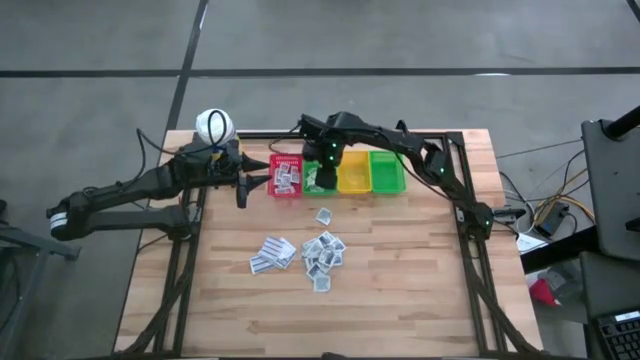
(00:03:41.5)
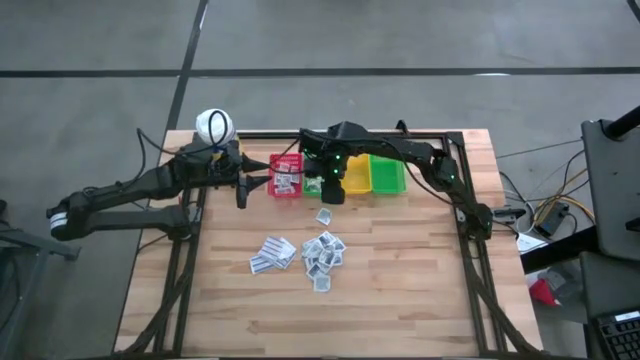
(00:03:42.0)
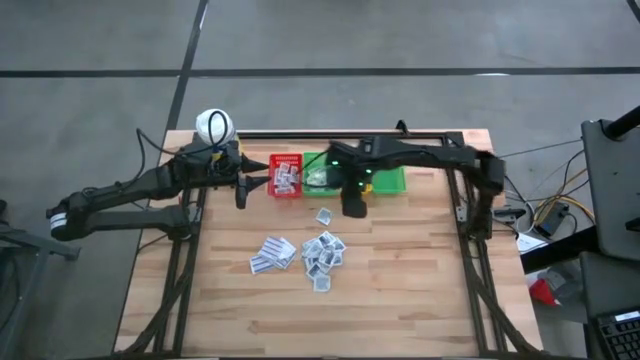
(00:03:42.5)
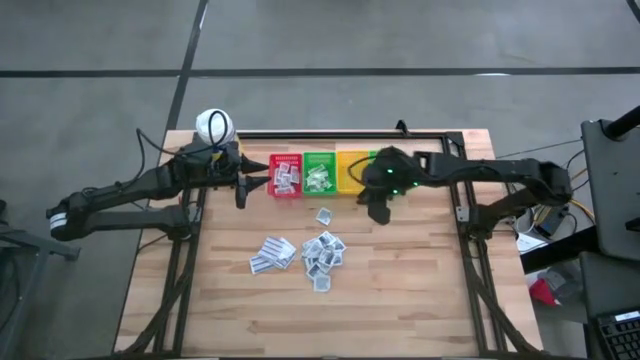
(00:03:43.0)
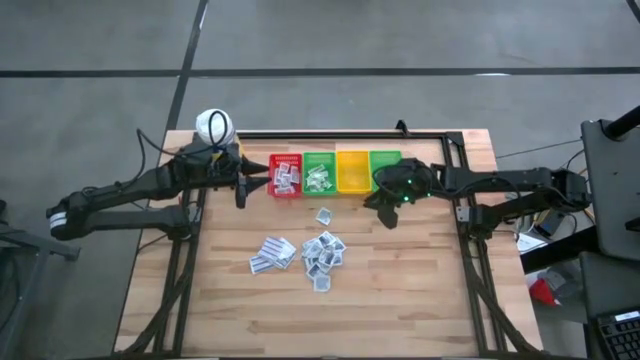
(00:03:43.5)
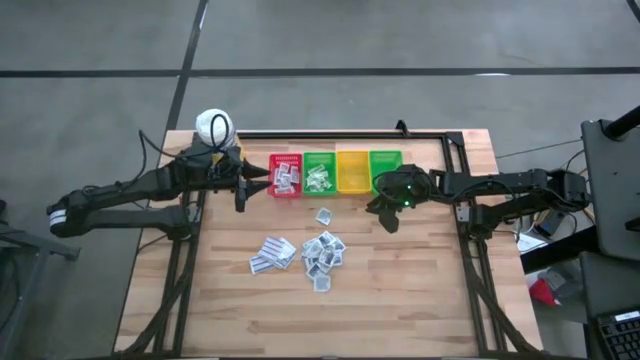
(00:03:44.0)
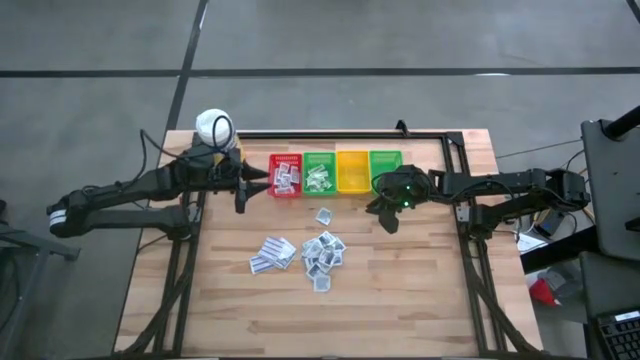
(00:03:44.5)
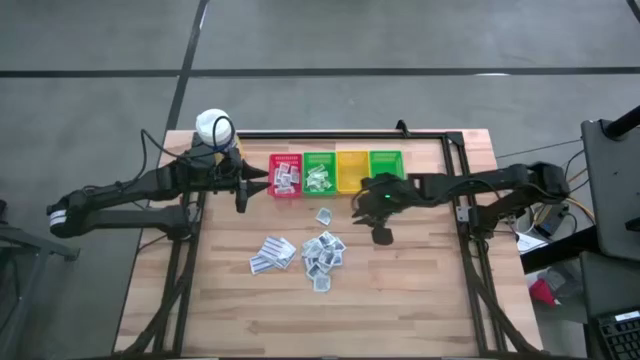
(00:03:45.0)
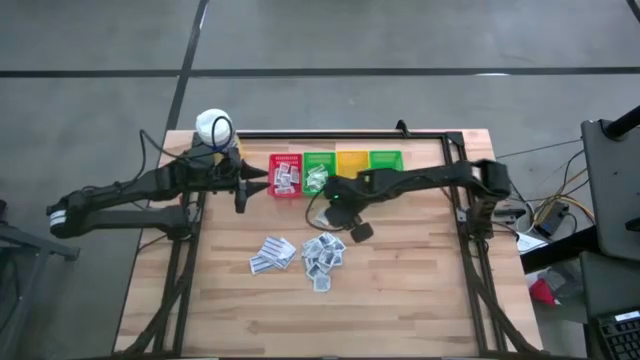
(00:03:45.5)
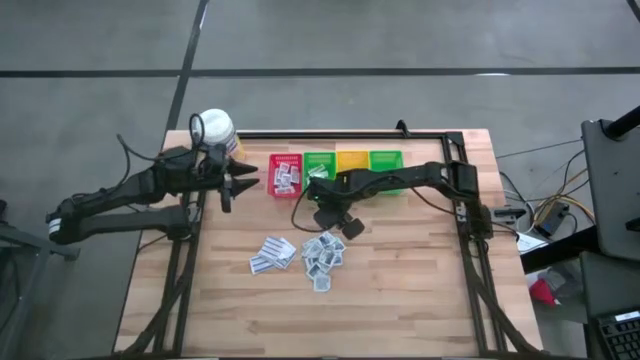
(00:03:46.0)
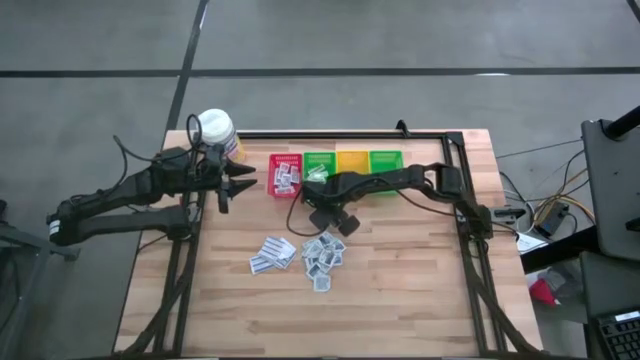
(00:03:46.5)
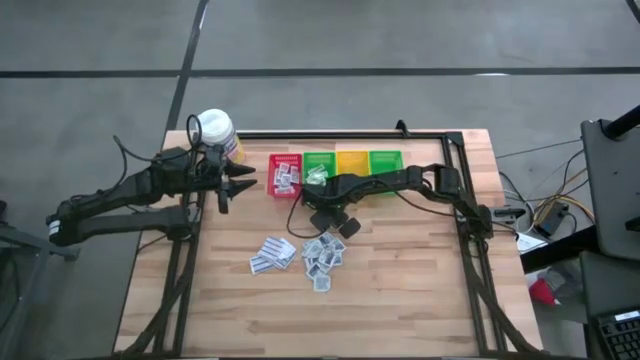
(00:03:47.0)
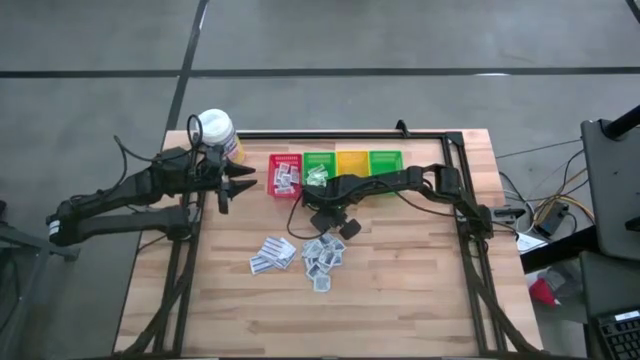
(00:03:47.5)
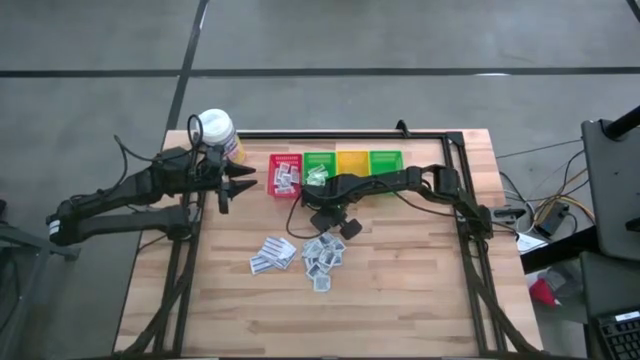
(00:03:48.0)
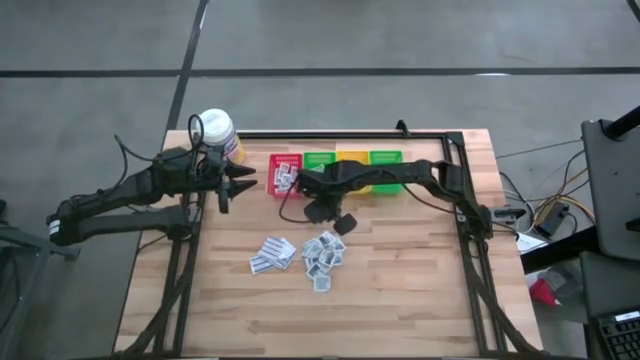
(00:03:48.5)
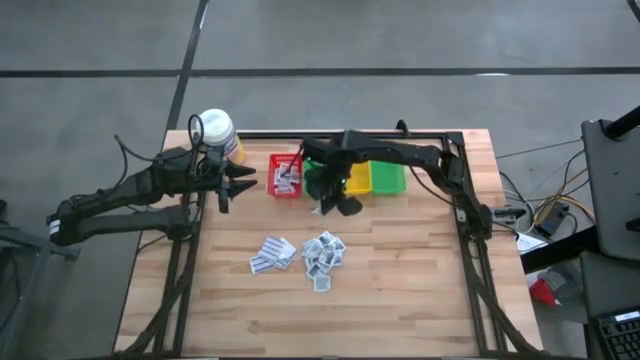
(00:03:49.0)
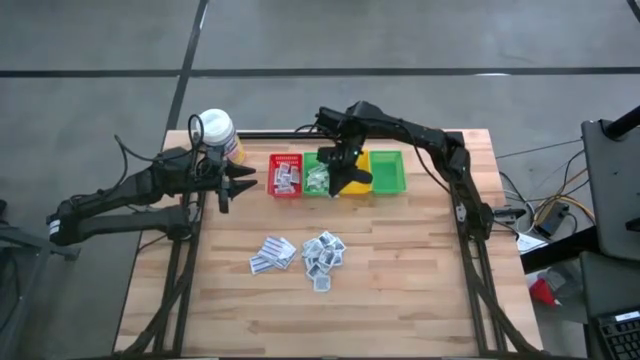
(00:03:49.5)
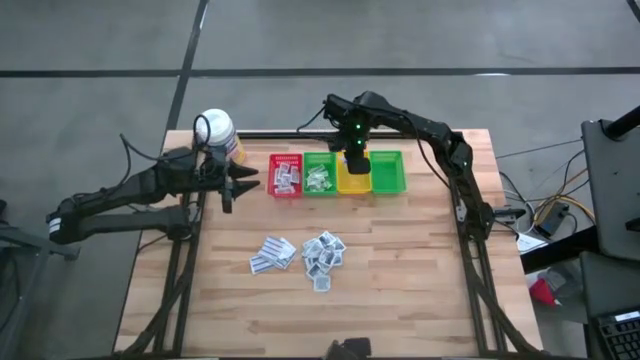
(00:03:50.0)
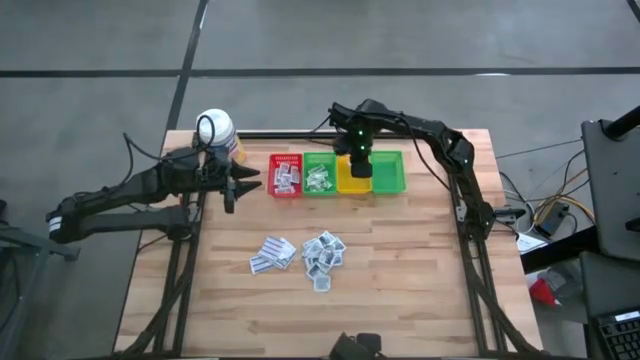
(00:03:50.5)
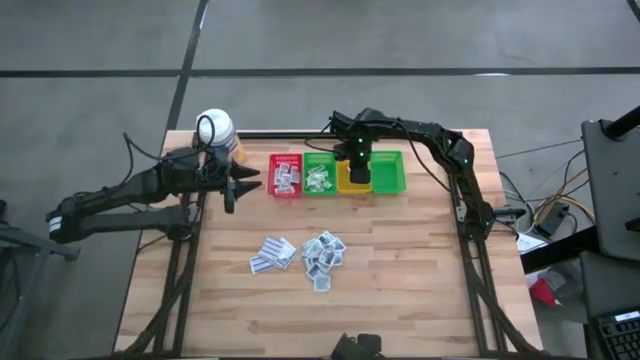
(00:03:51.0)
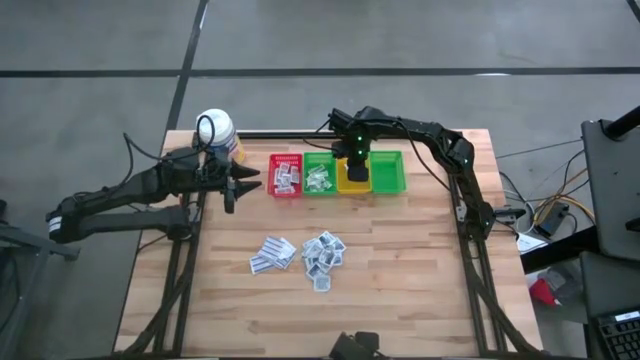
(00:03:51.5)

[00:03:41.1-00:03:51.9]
Task: Pick & Place First Aid Supplies
Put the alcohol pad into the yellow bin

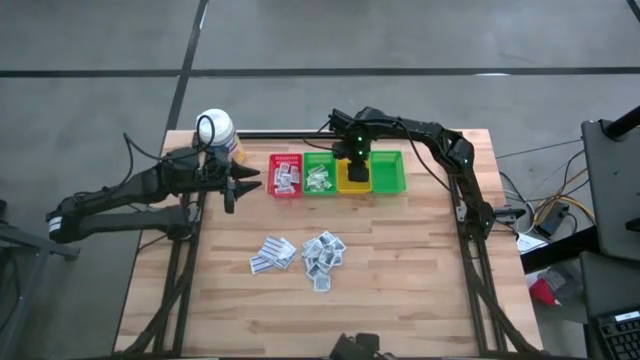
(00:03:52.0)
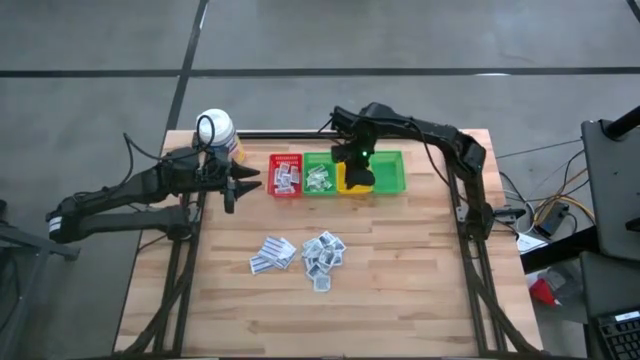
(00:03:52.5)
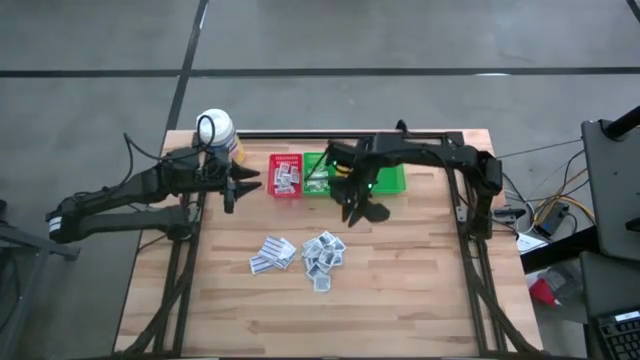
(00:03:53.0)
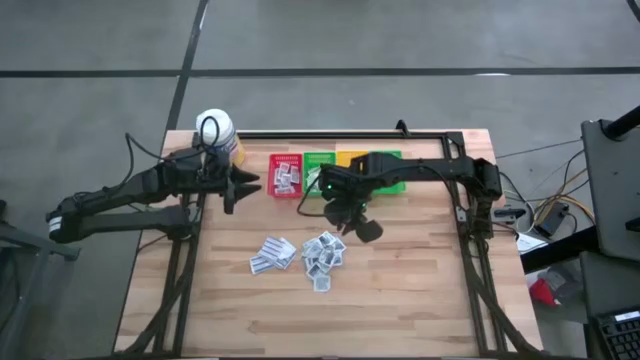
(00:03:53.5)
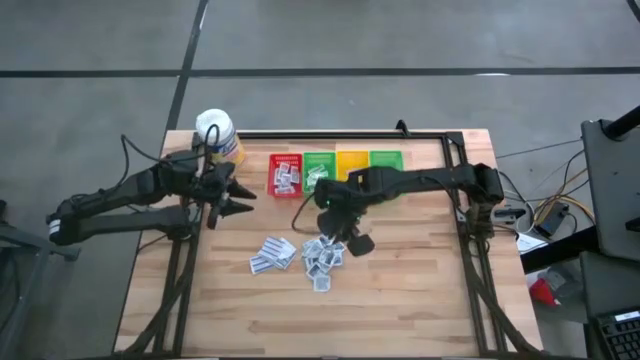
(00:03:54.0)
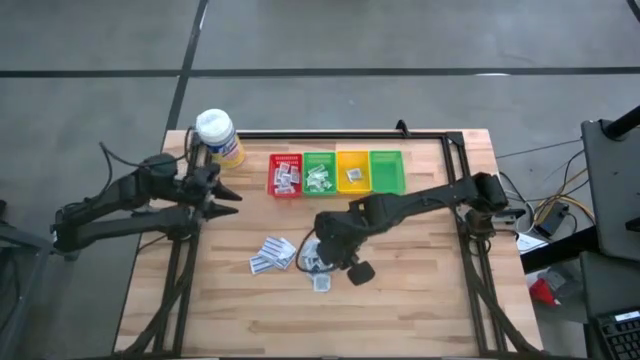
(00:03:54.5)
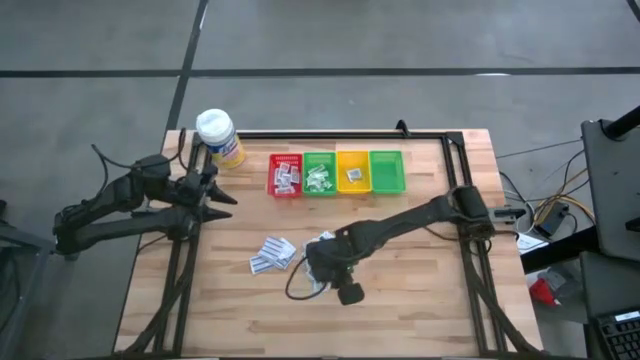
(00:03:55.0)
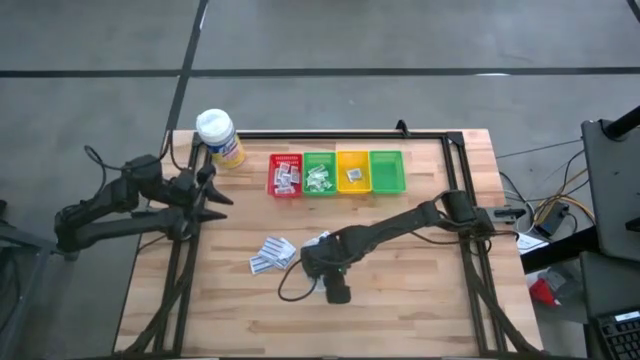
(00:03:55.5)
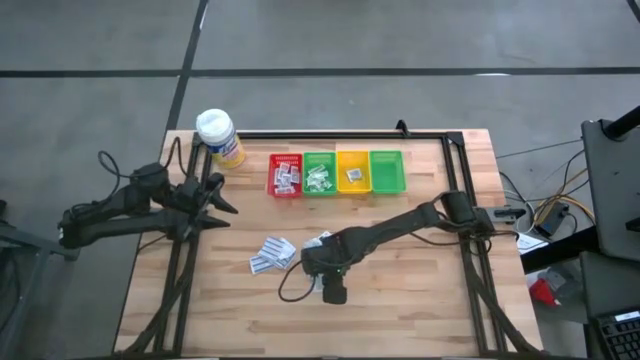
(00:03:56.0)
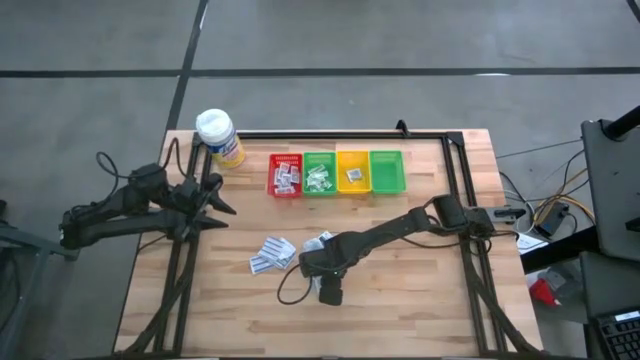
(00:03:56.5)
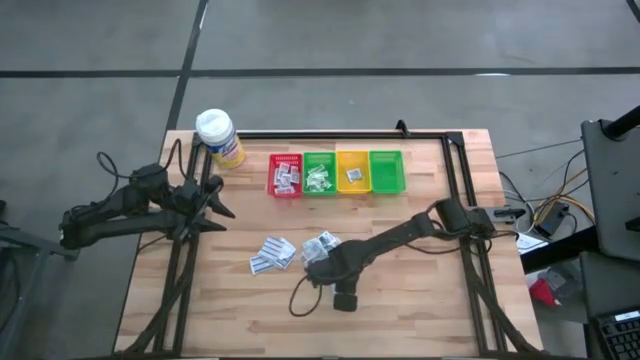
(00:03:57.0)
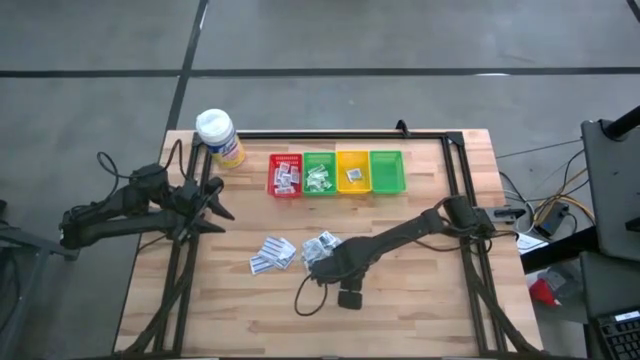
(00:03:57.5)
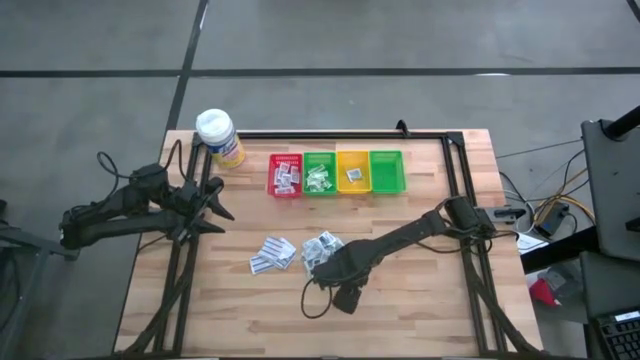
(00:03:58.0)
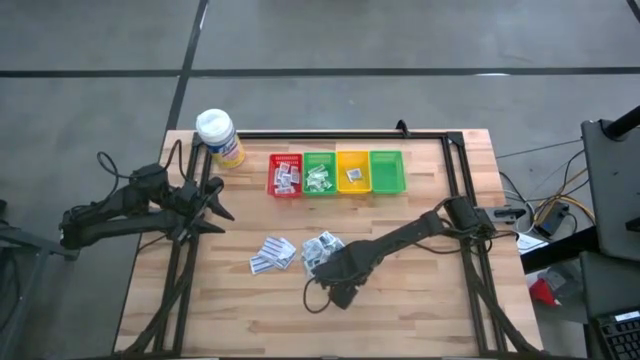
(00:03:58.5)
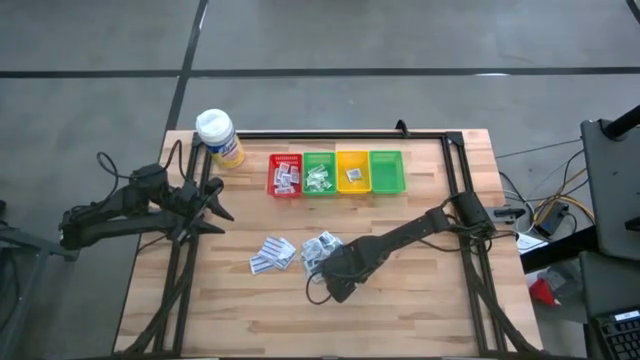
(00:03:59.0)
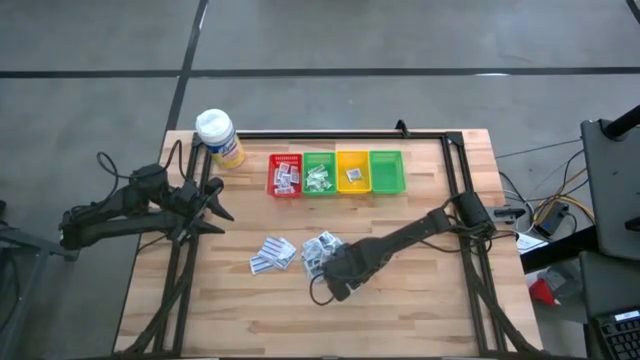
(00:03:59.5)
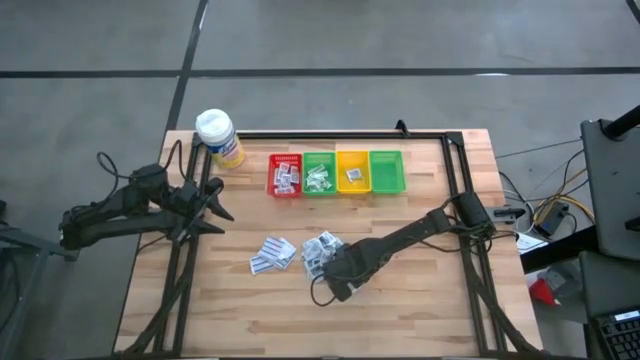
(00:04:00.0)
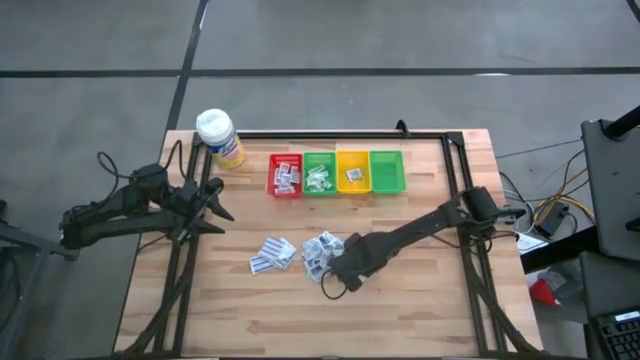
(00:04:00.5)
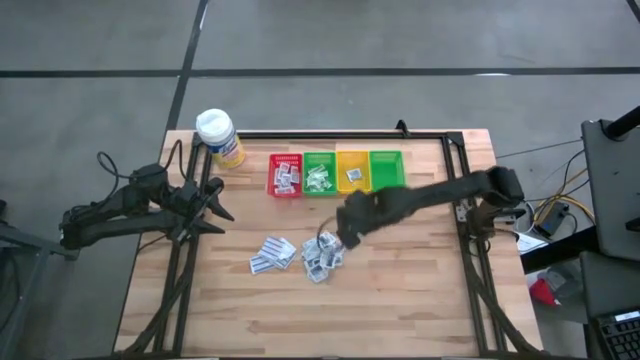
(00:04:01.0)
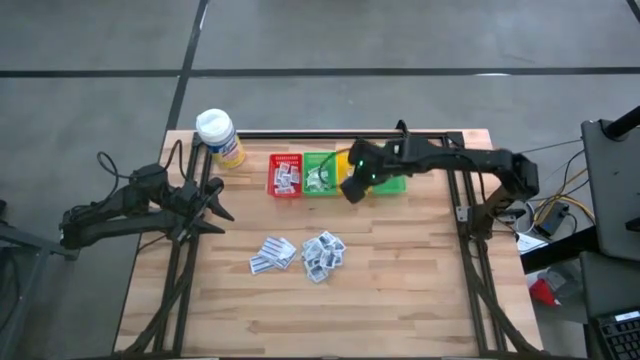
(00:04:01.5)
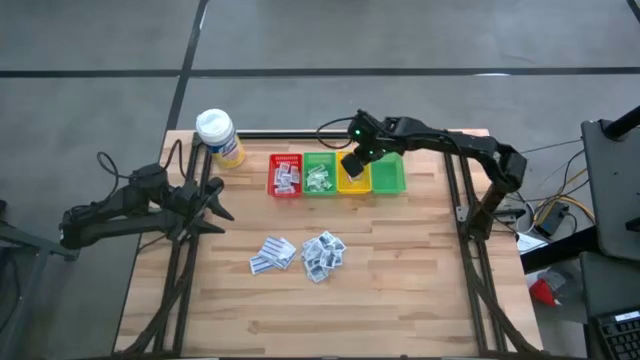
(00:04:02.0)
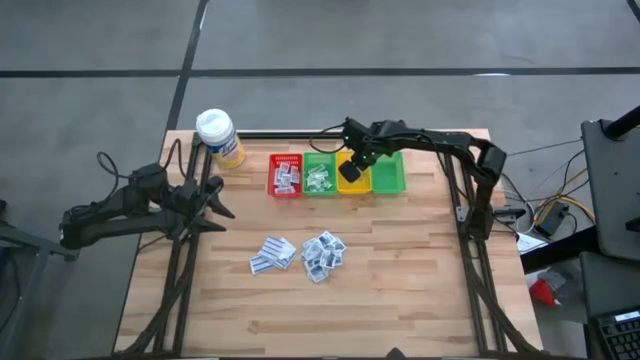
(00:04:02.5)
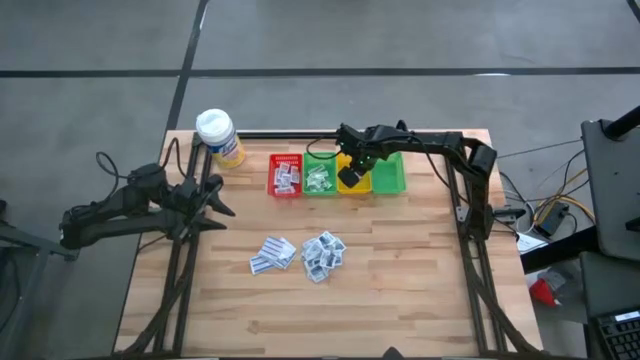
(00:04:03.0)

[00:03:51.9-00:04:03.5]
Put the alcohol pad into the yellow bin
